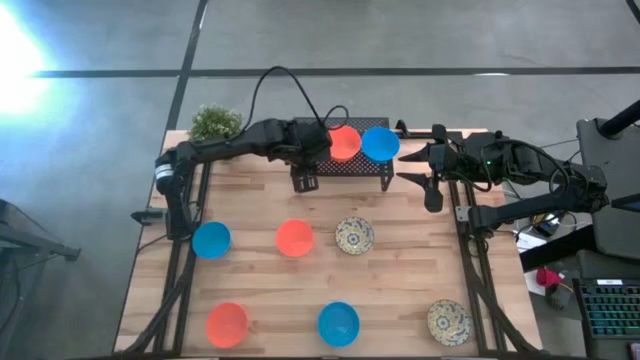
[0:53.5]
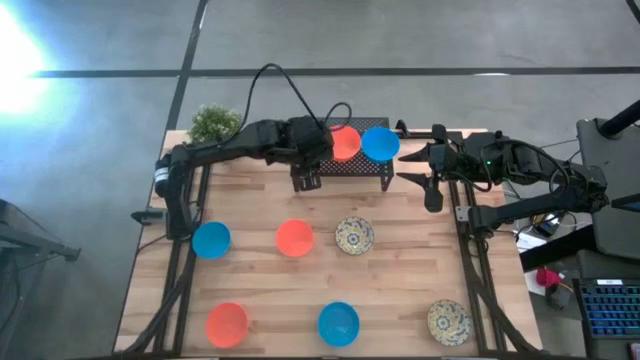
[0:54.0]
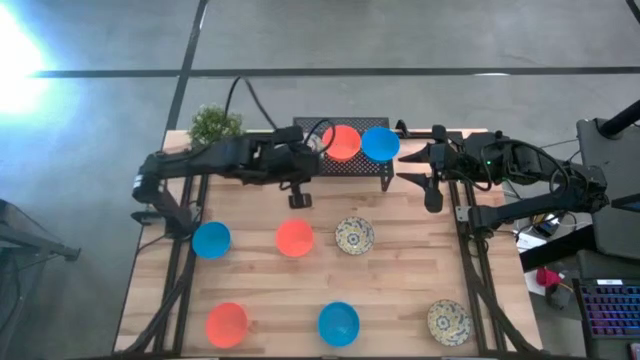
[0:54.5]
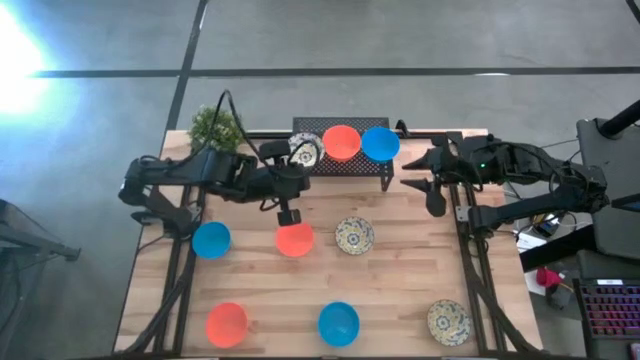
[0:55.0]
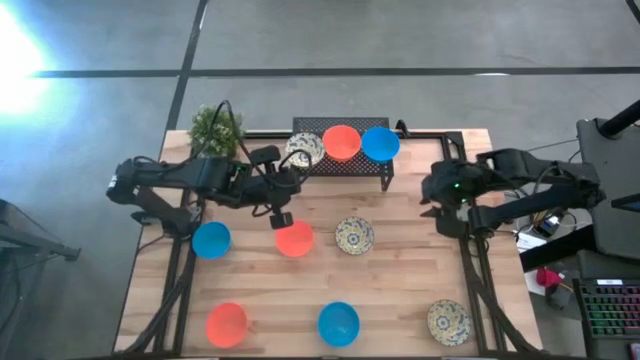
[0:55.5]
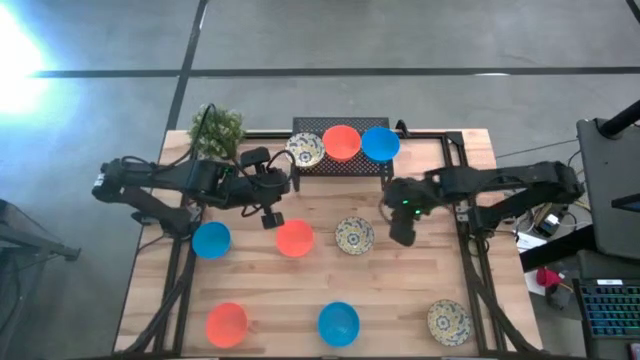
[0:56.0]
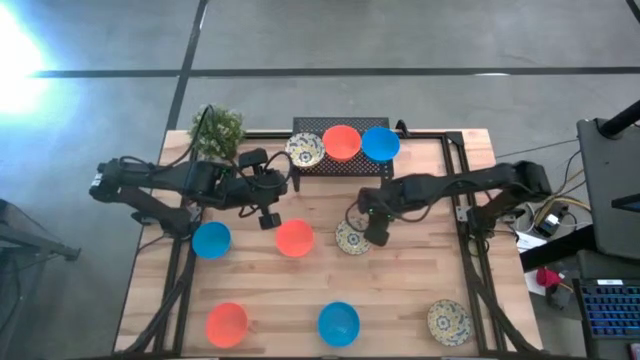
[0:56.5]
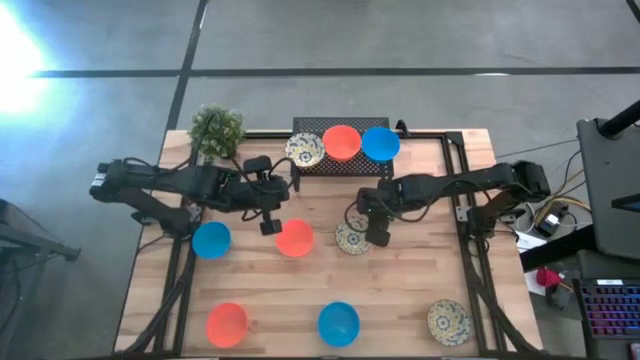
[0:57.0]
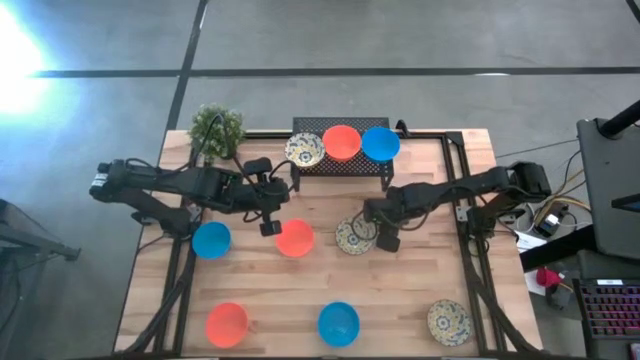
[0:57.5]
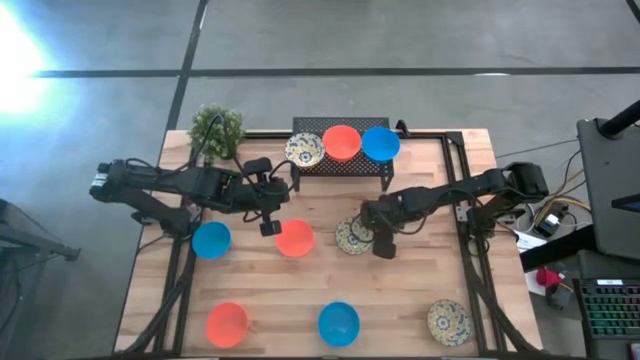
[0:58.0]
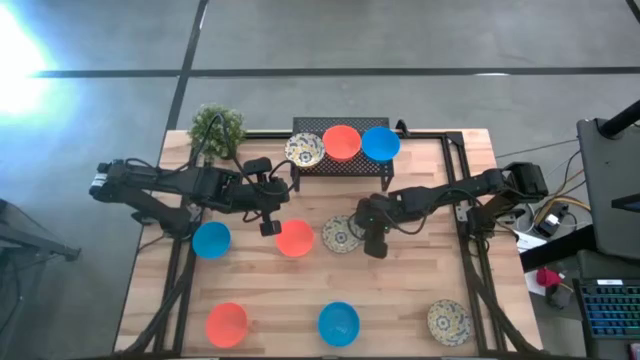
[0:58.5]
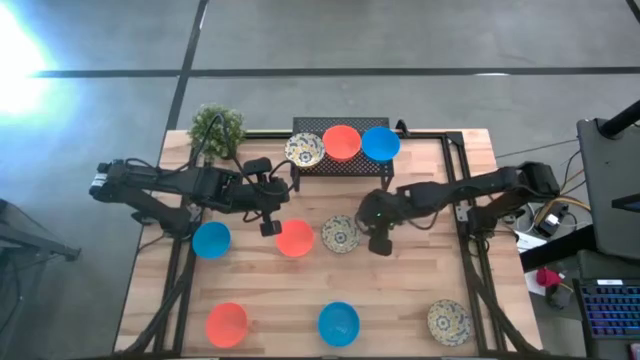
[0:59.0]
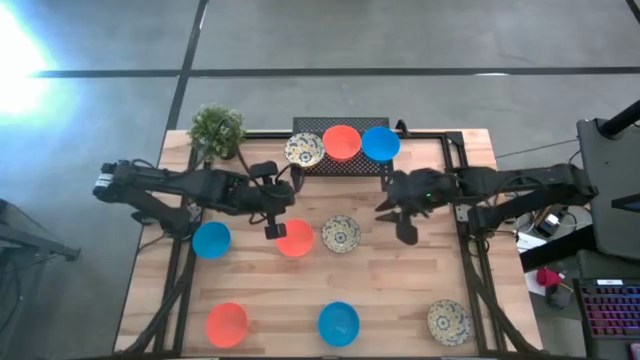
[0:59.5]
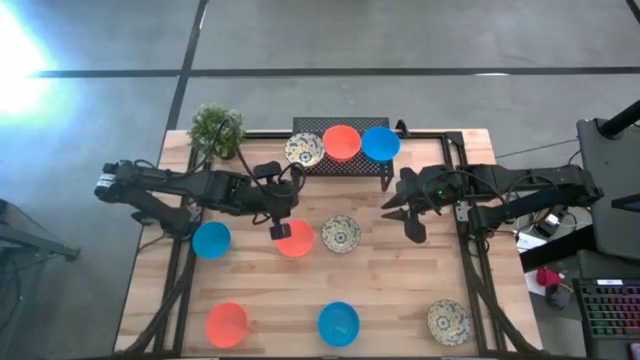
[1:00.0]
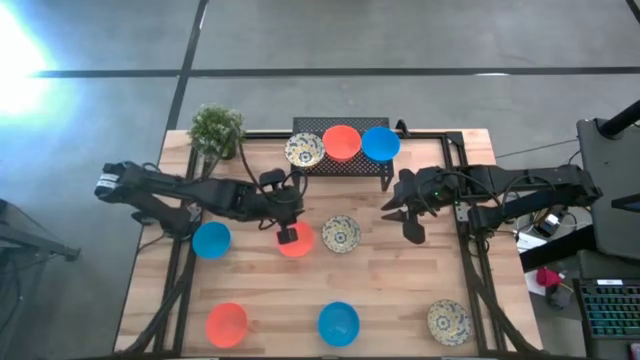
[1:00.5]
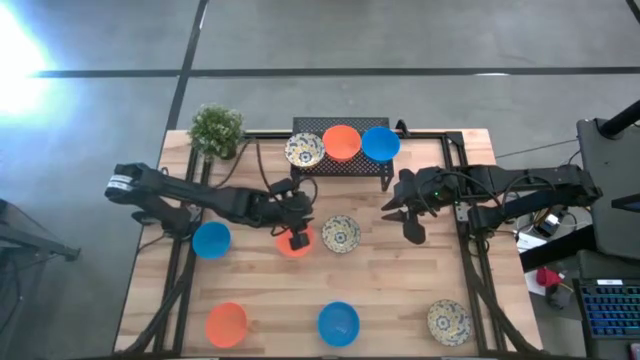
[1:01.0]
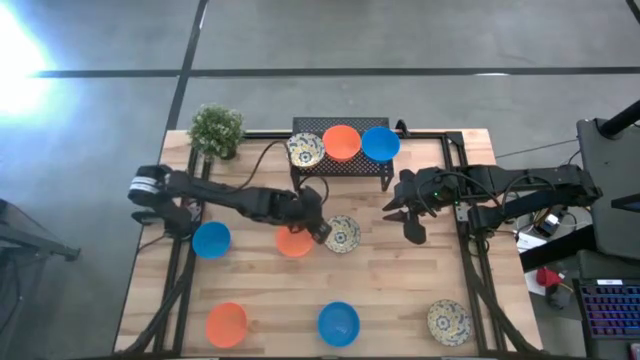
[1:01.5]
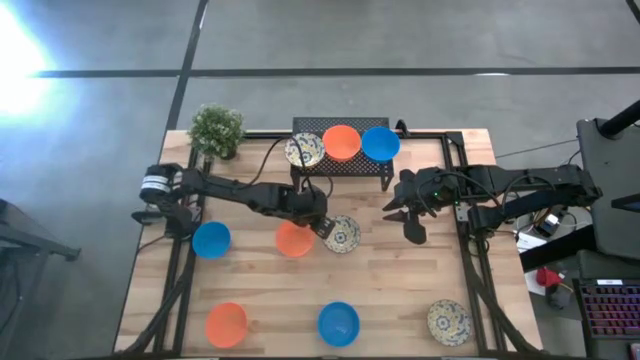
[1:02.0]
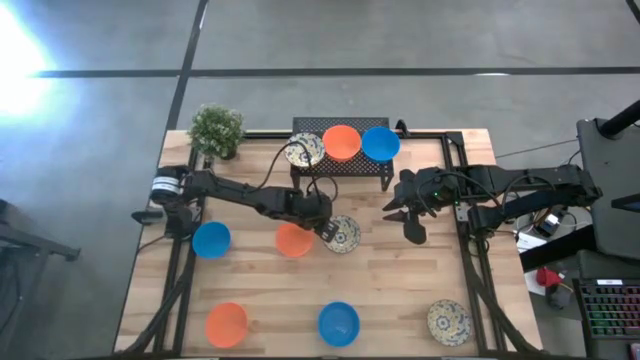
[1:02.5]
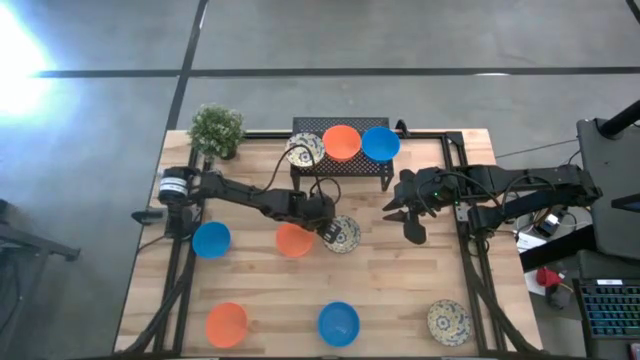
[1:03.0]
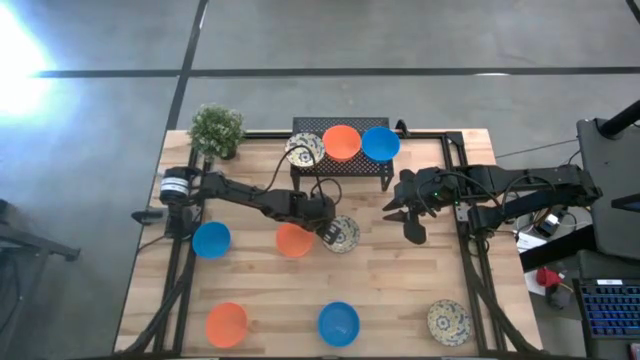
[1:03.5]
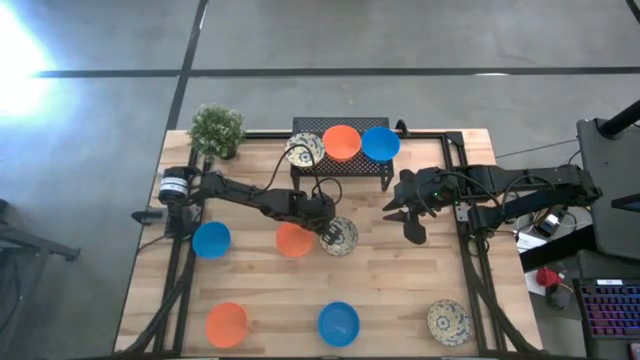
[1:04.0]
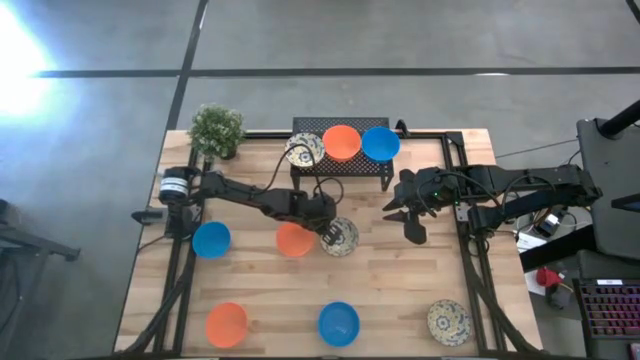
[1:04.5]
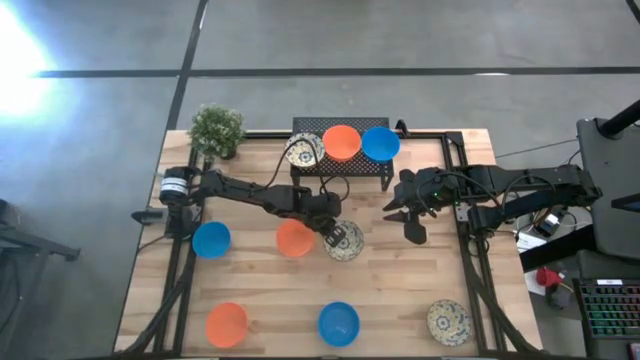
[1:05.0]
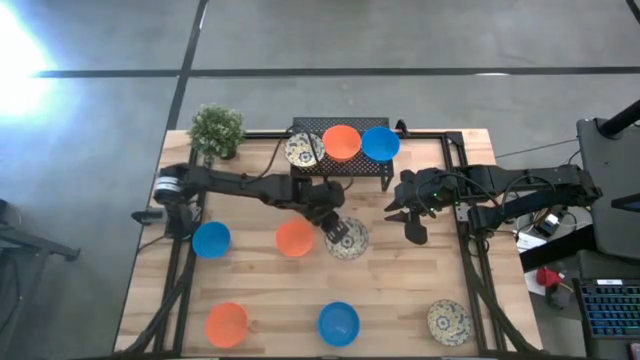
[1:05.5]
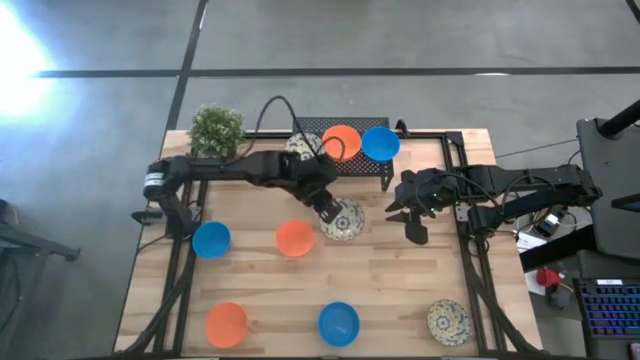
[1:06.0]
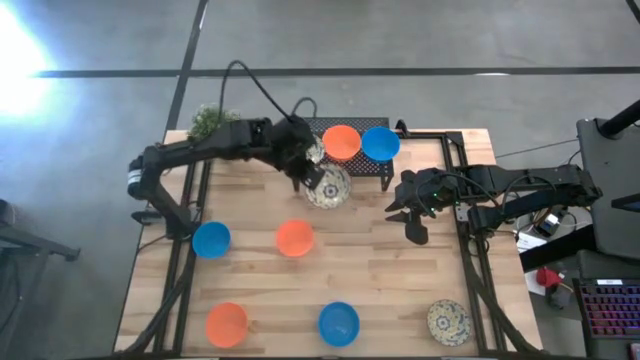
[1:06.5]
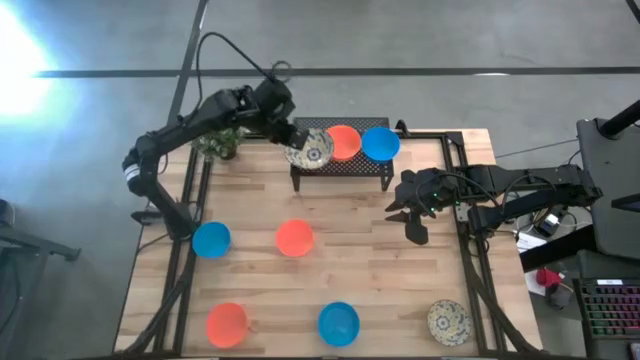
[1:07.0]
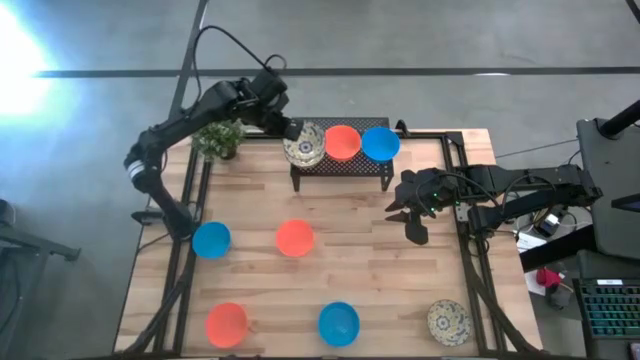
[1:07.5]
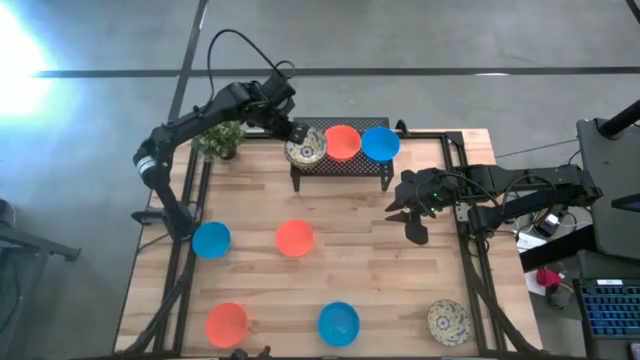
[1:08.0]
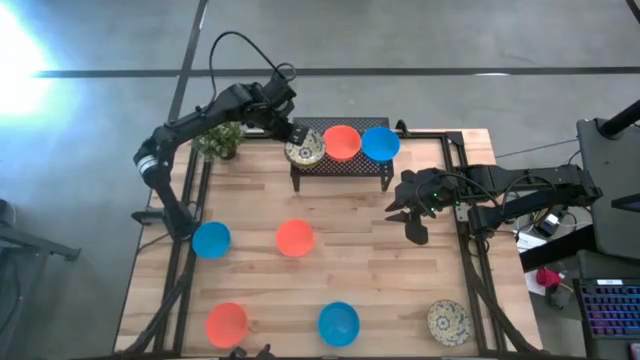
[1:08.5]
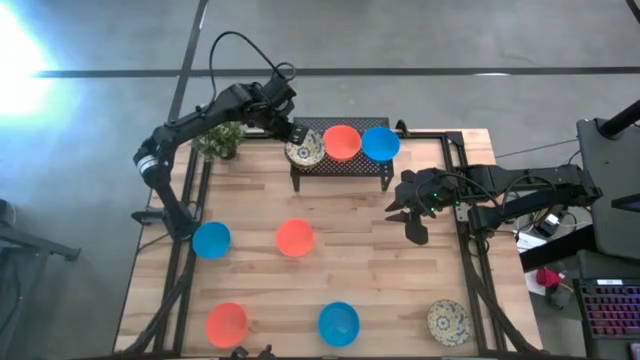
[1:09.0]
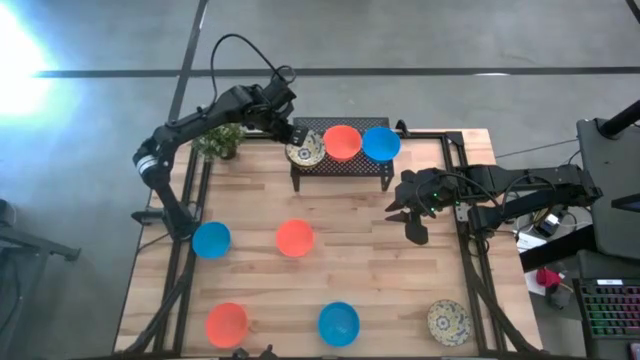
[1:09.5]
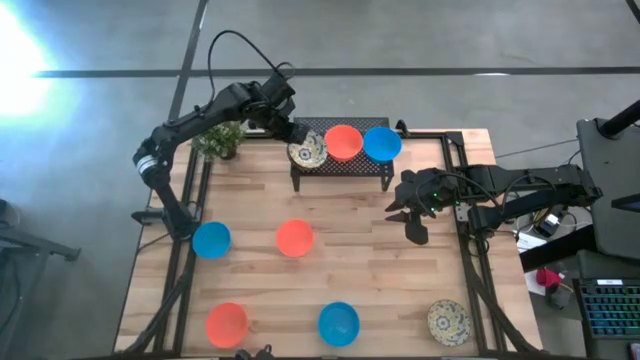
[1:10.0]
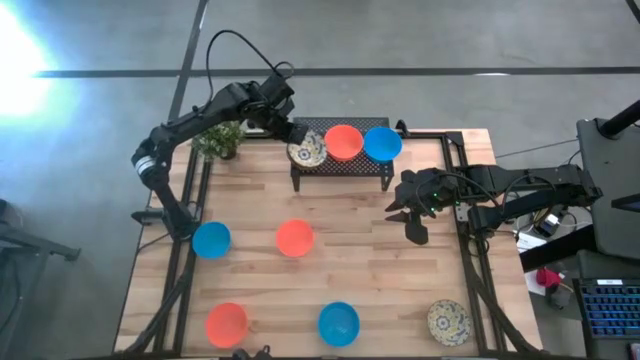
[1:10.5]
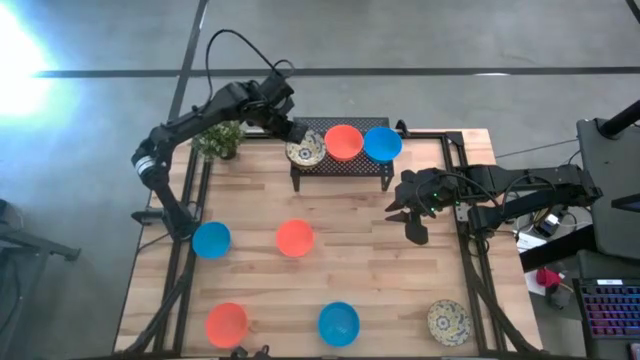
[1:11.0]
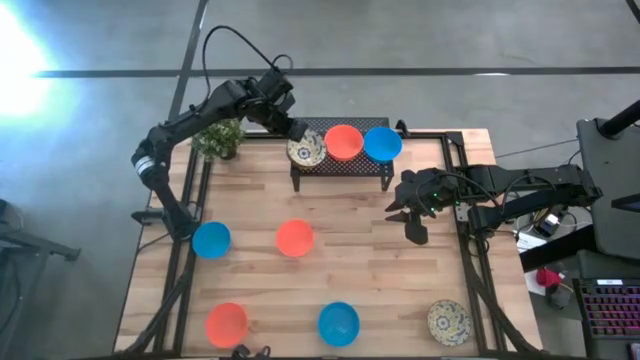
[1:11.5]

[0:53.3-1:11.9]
Task: Pick & Place Mini bowls
Stack the top yellow patterned bowl on the yellow patterned bowl on the shelf

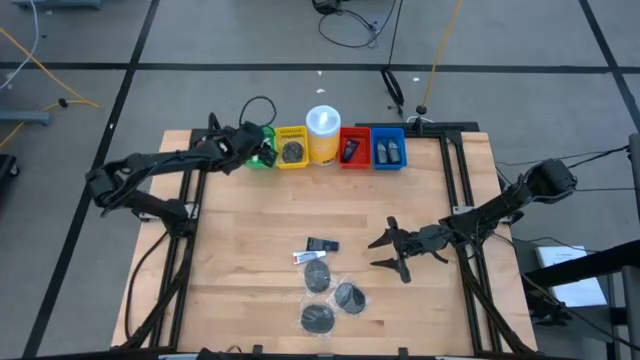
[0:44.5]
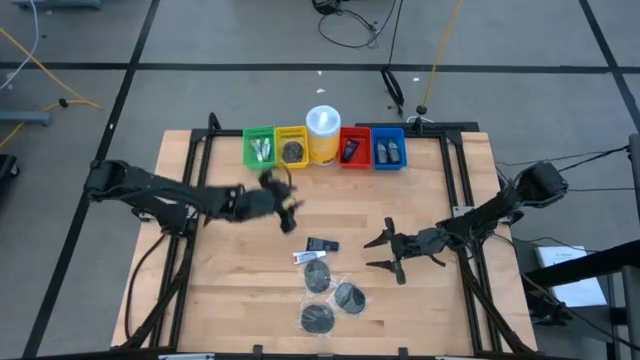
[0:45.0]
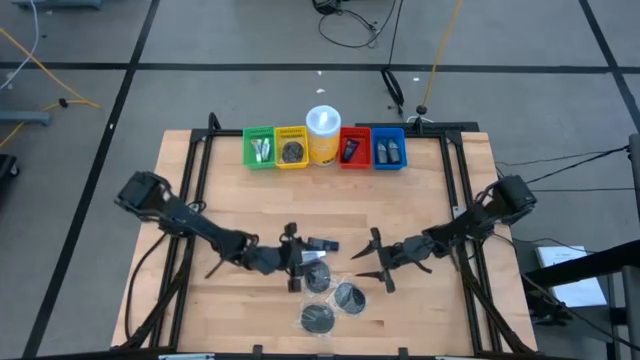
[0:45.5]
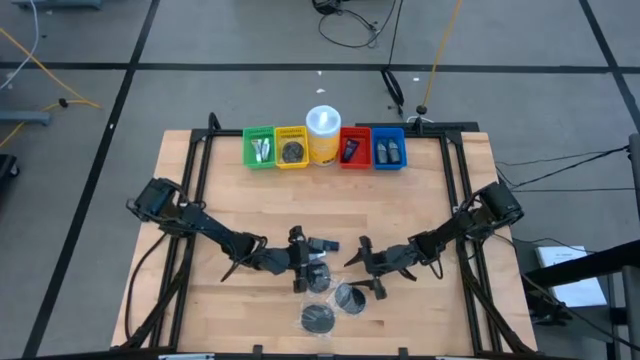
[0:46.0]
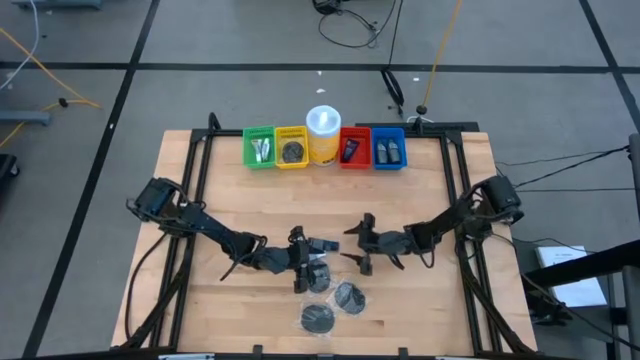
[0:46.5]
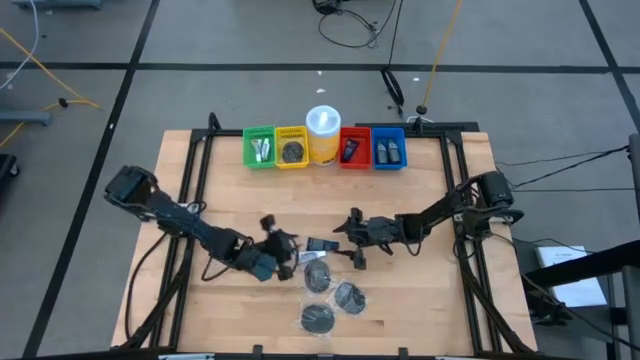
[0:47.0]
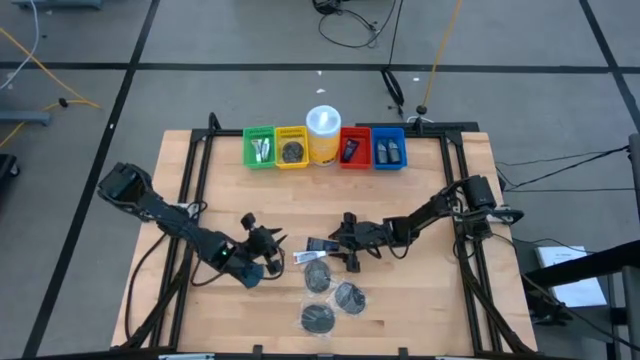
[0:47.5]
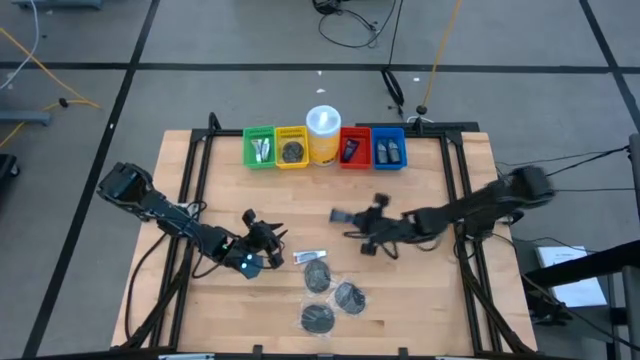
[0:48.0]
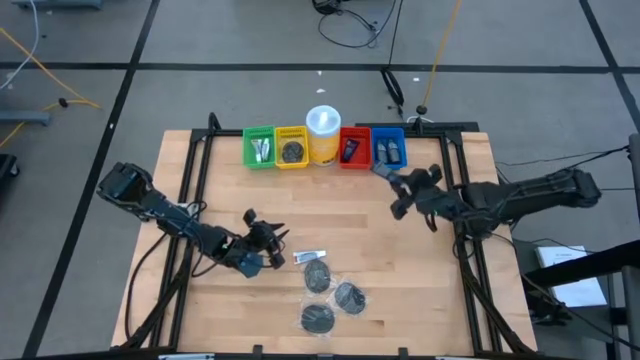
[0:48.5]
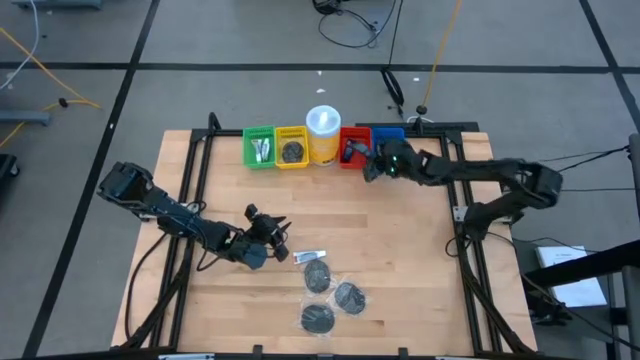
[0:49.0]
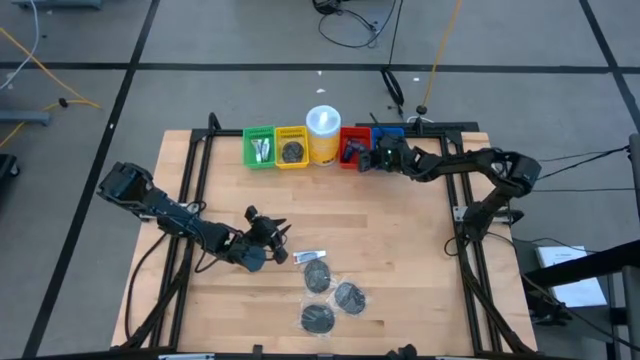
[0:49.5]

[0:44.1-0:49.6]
Task: Pick & Place Travel size toiletries
Put the dark blue shave cream into the red basket
